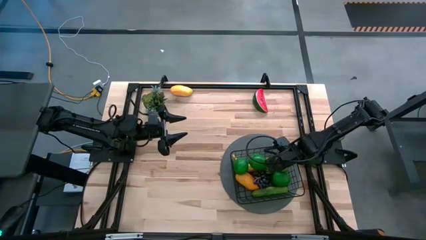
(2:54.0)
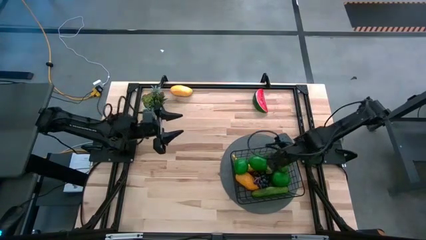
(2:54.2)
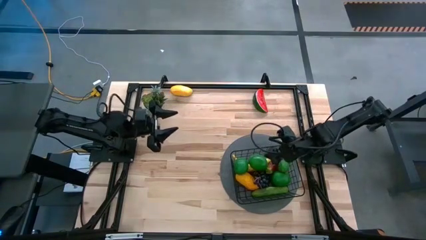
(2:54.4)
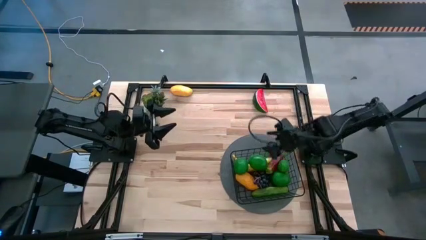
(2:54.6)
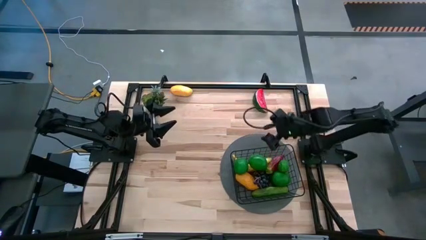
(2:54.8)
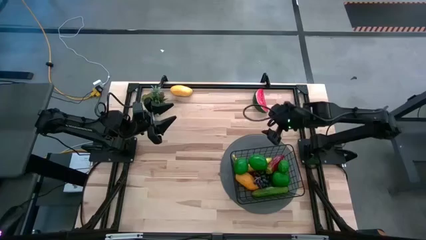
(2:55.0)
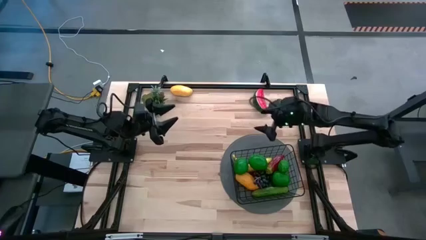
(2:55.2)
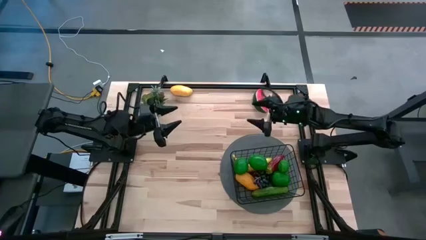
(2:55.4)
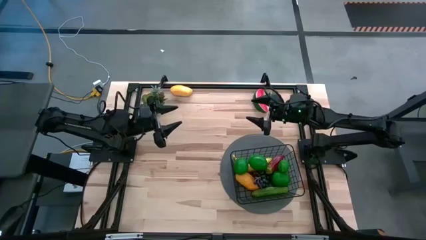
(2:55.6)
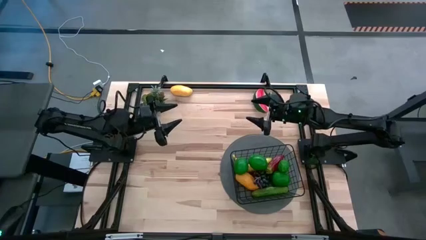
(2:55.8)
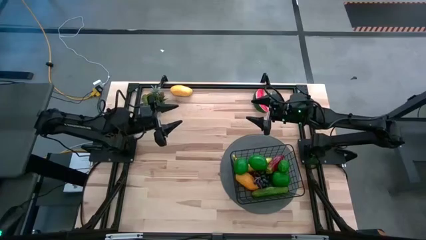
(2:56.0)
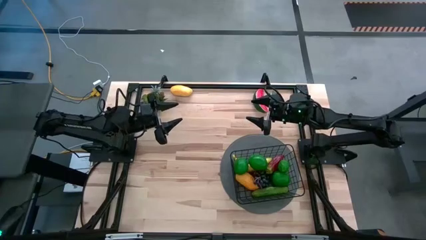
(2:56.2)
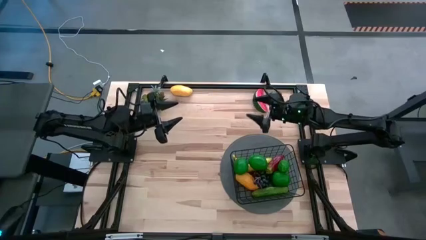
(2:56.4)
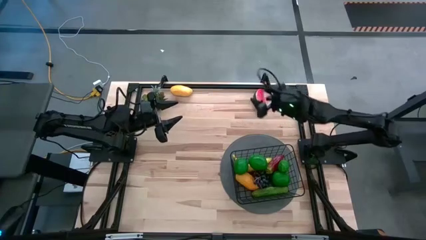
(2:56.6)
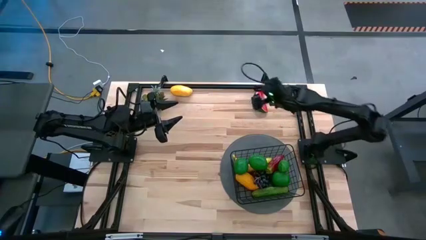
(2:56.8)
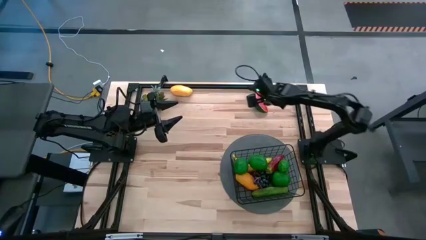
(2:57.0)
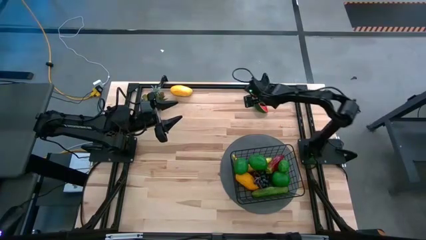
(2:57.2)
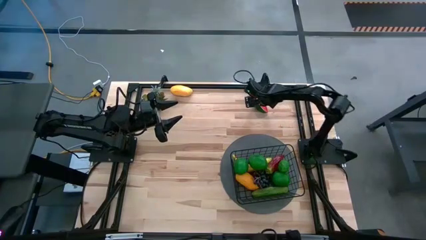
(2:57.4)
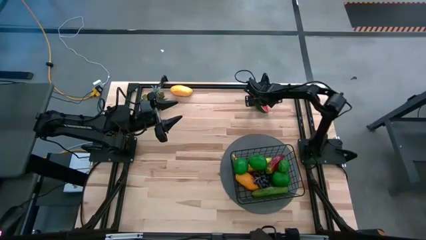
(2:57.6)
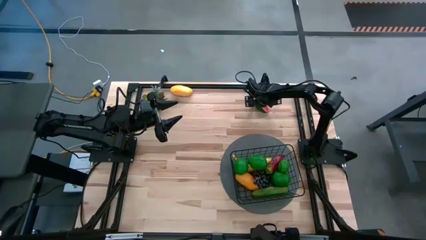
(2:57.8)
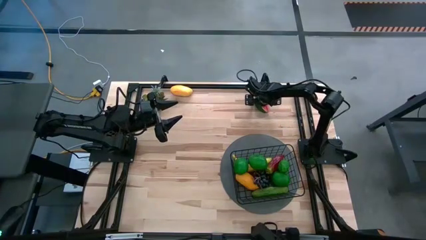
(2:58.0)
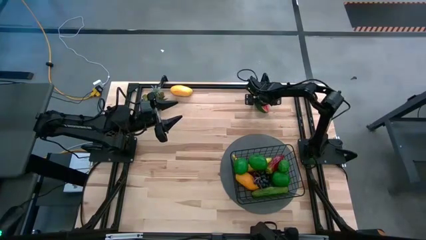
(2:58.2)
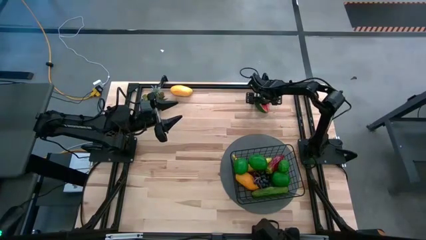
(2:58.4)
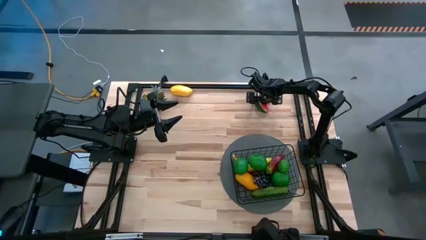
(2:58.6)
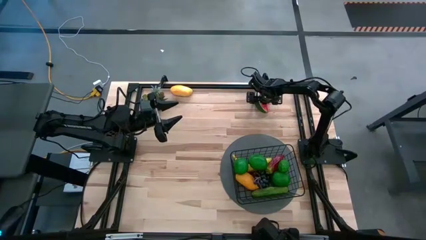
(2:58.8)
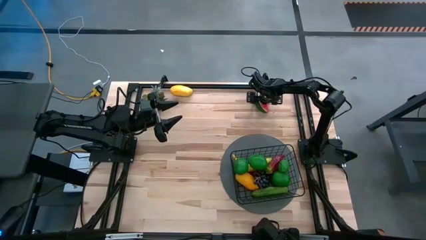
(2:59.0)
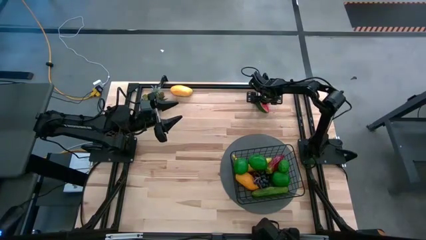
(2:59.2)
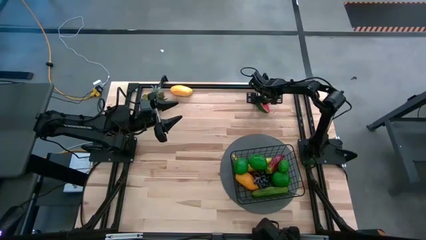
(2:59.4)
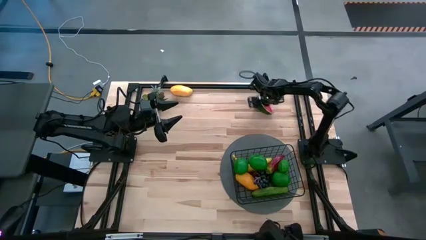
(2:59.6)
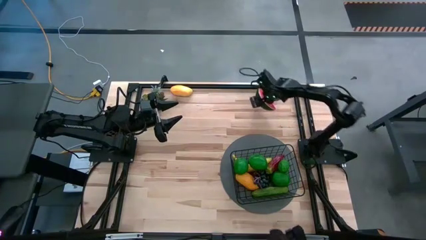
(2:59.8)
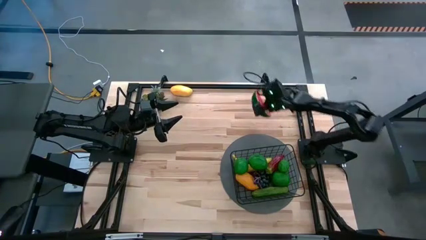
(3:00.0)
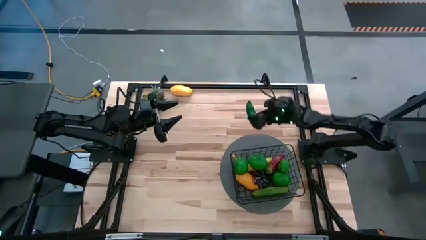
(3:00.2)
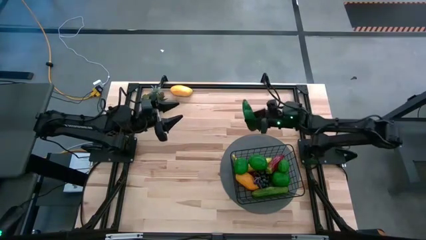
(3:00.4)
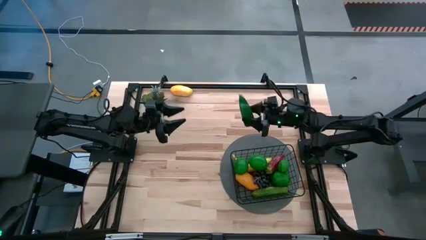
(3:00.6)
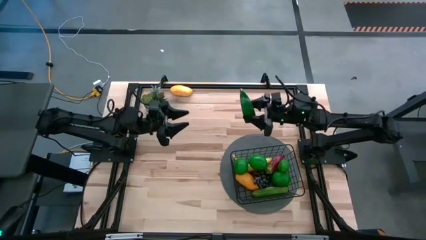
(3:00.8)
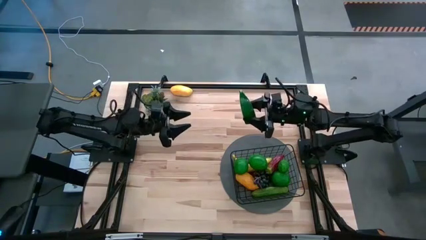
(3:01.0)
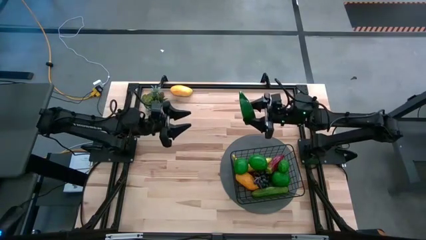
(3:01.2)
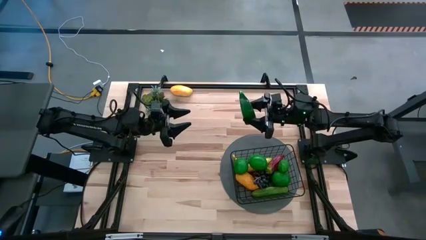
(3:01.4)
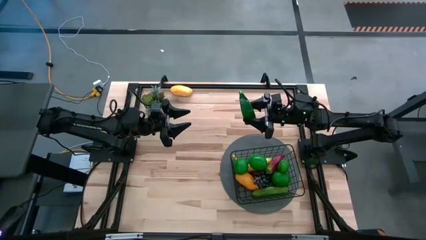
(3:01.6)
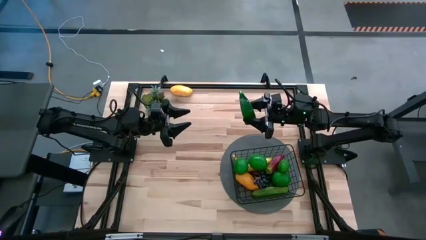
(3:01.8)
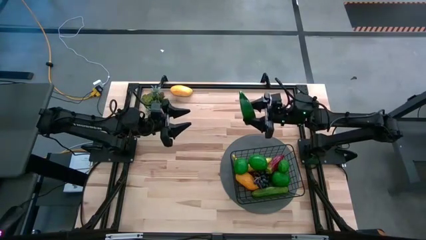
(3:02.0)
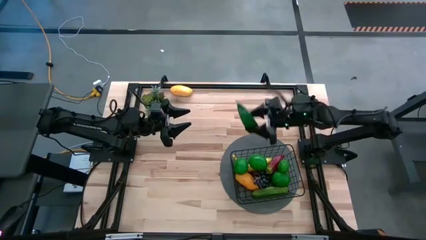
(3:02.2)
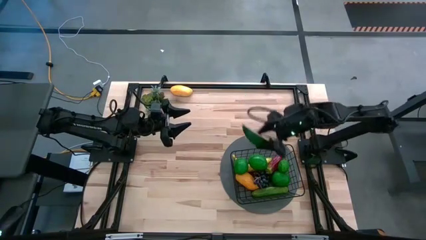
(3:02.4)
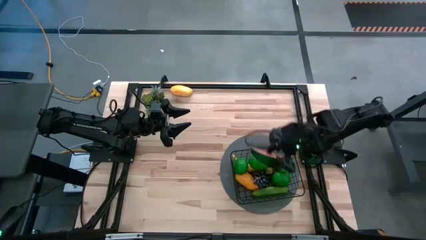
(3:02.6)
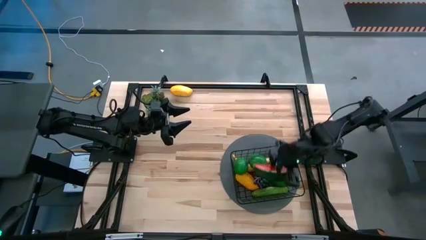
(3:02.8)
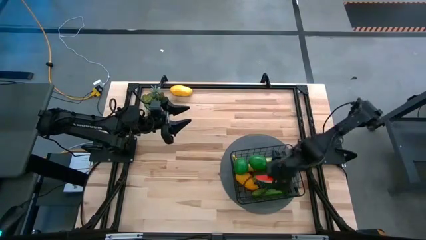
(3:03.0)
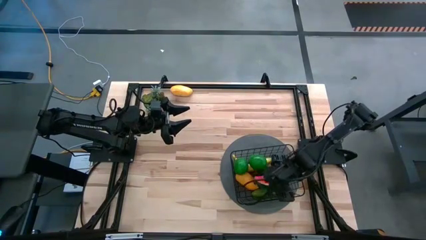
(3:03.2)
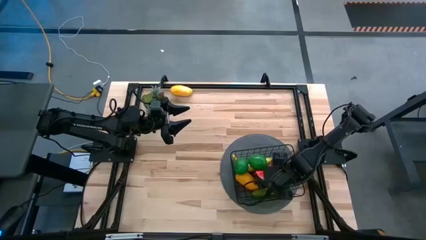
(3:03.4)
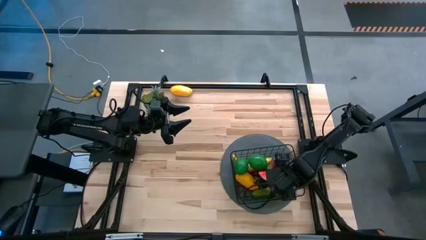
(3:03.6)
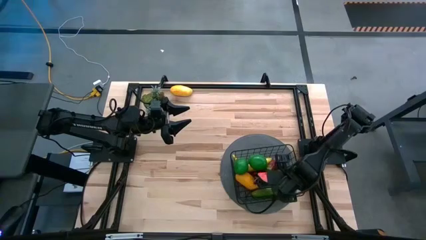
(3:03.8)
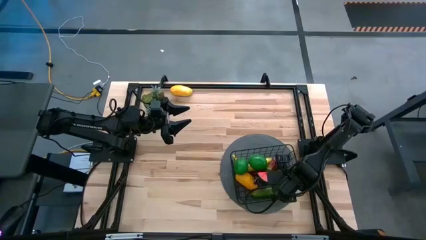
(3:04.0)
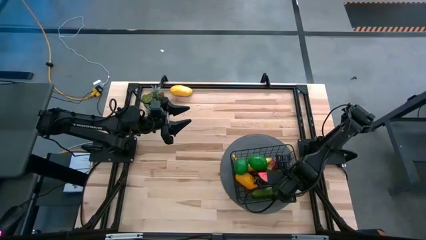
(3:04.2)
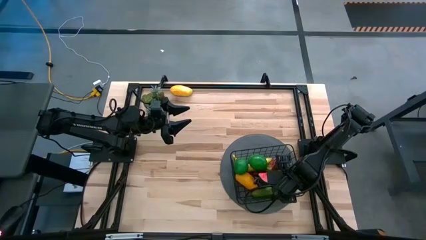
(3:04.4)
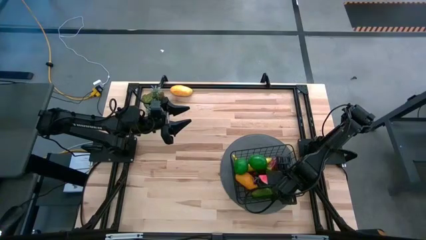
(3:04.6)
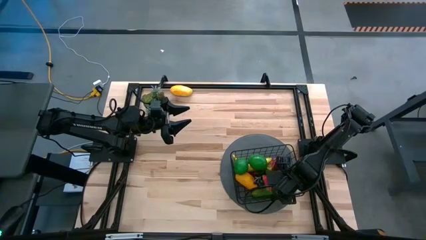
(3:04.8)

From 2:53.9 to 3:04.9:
Task: Build produce basket
Put the red watermelon into the black basket

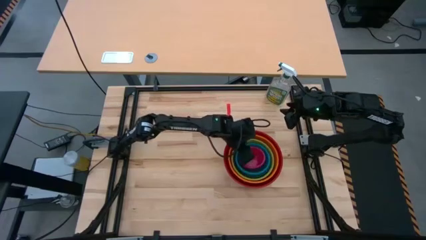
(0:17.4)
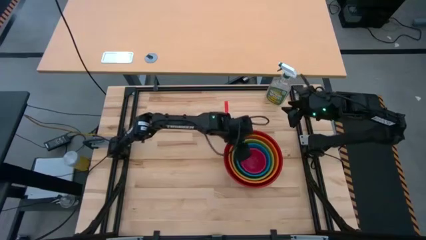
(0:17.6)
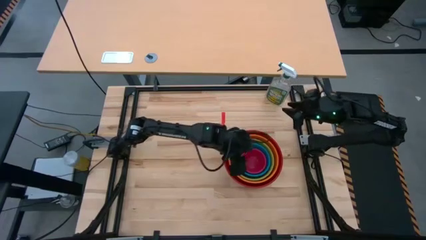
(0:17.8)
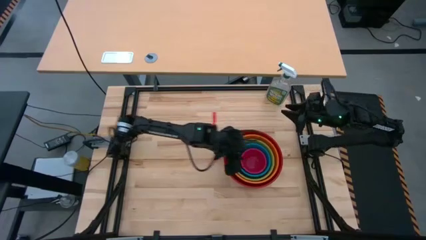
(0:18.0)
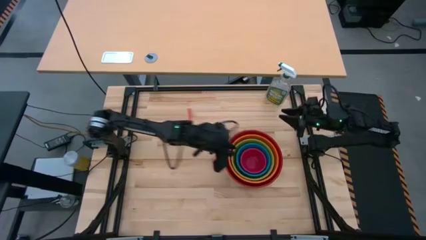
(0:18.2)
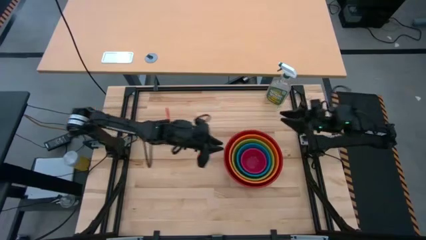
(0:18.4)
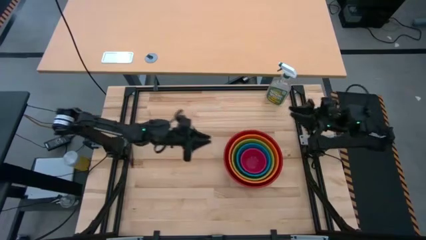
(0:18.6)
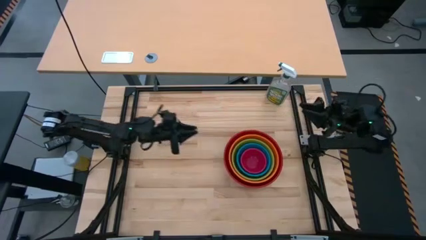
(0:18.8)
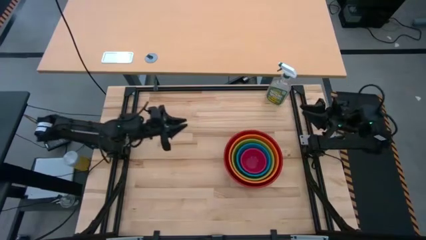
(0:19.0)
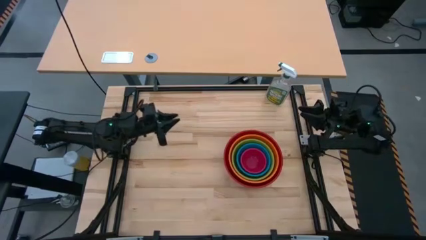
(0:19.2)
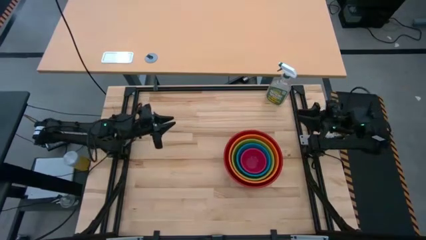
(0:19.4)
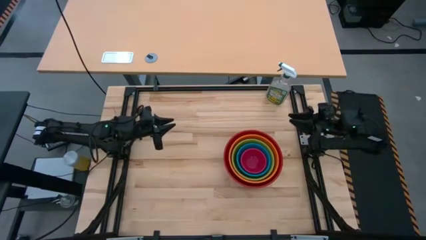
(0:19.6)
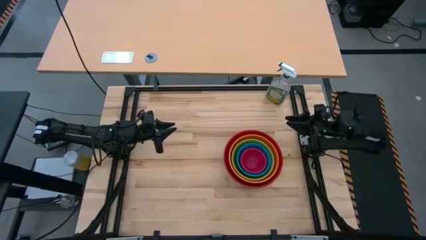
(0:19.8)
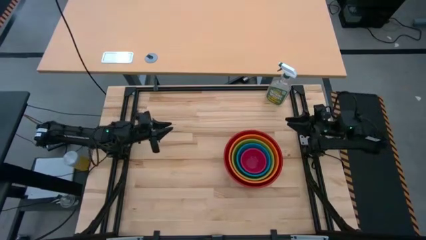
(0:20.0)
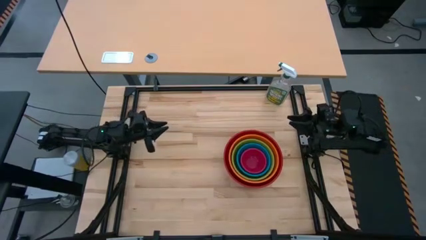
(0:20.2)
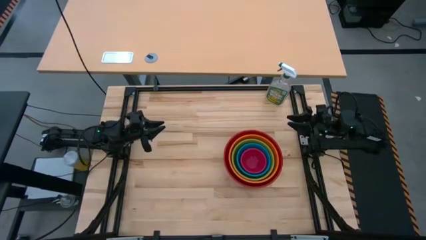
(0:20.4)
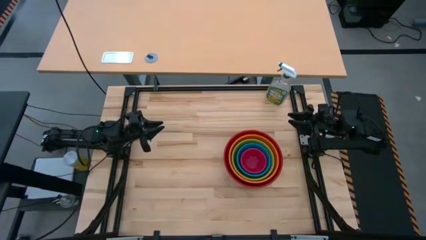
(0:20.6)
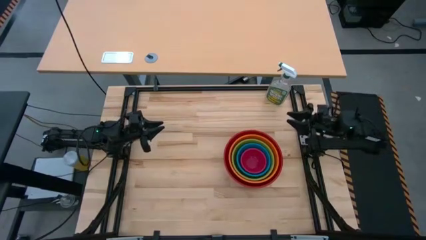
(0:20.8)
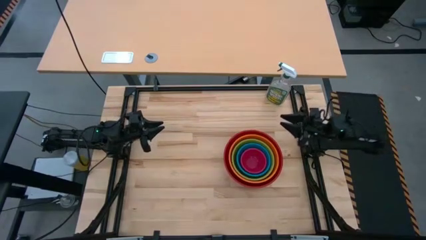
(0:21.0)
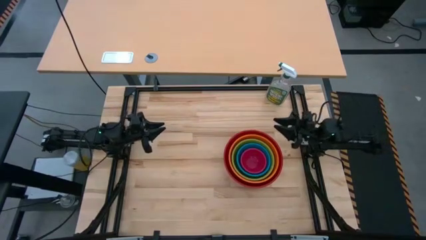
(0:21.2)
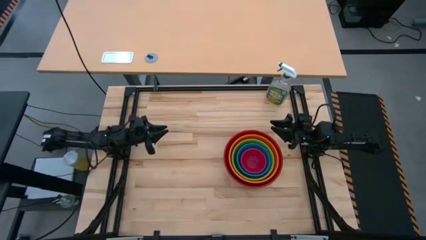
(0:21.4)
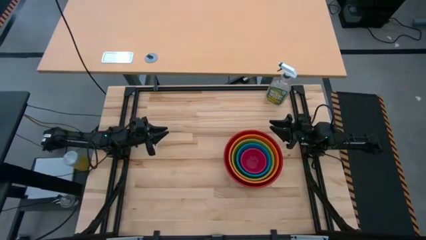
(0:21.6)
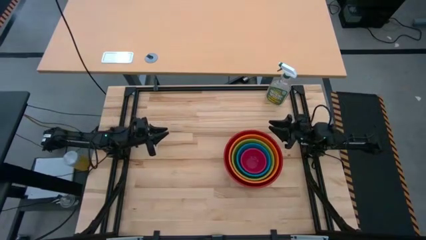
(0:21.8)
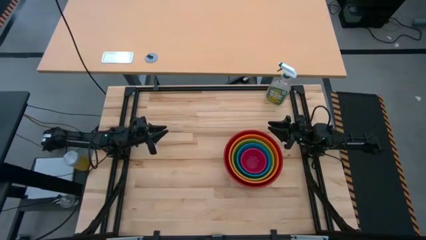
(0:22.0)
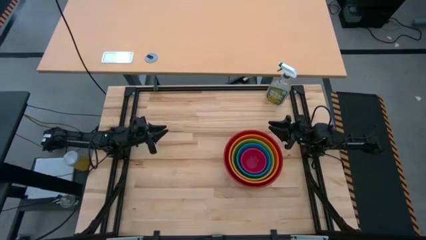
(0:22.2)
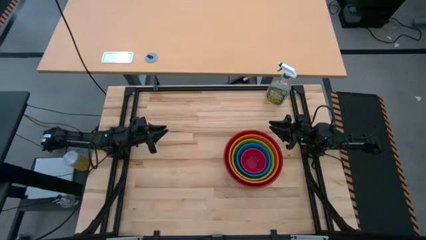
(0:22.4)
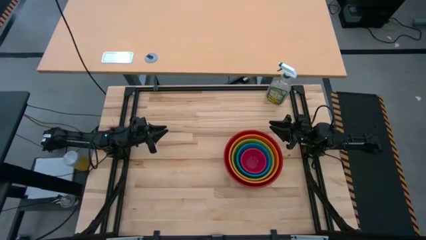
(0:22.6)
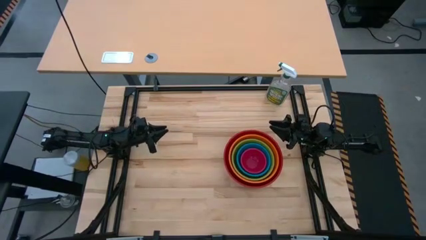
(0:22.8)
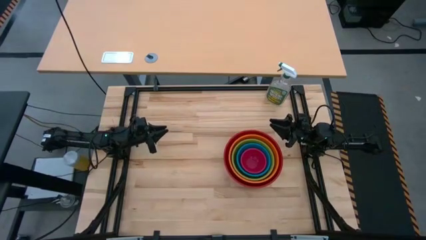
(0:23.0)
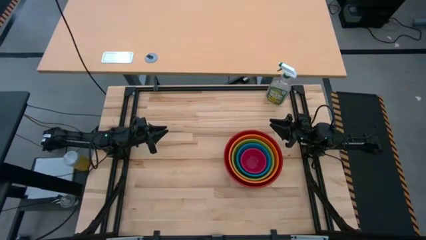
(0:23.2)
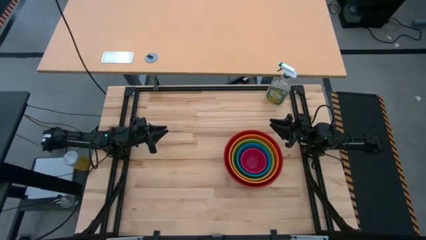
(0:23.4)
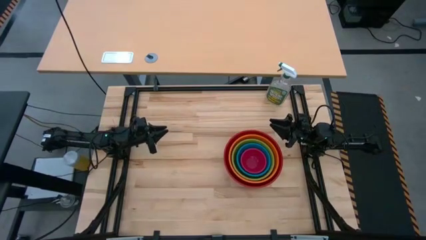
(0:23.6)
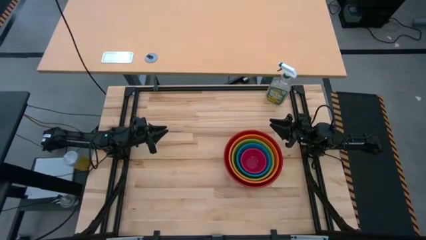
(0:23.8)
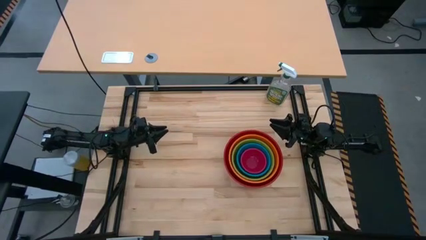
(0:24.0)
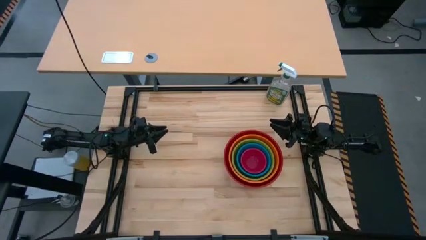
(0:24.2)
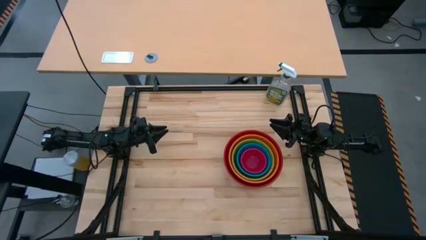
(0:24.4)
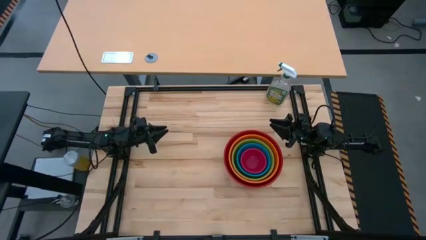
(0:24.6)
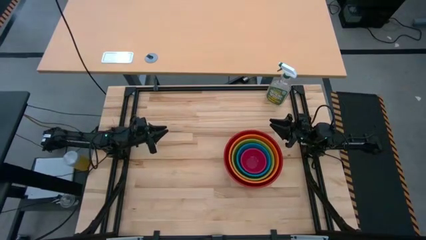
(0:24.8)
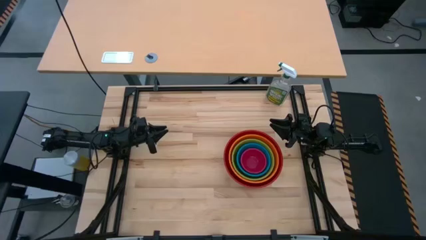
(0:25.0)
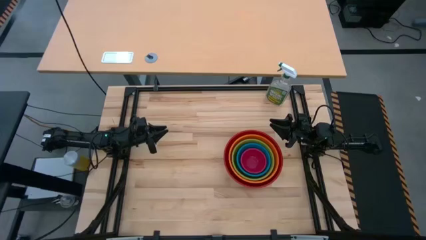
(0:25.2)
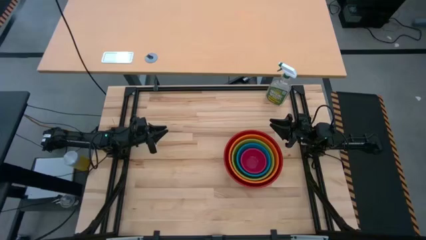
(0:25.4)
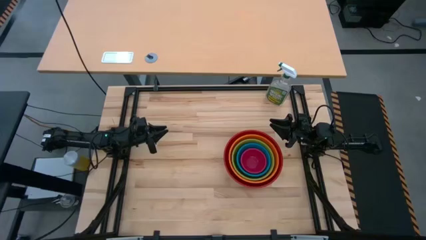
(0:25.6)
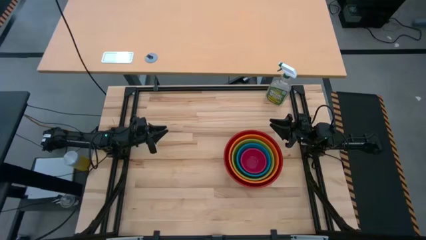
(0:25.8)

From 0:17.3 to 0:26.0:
Task: Nest bowls inside each other by size order
Return to Home Position
